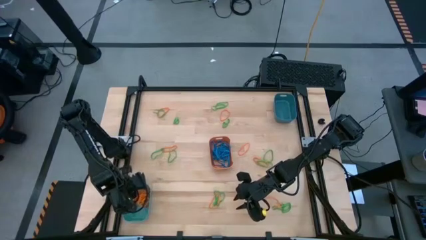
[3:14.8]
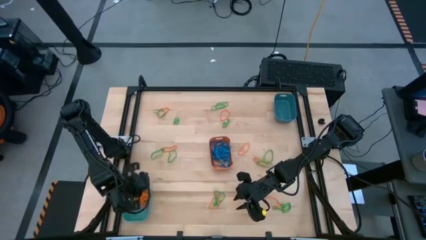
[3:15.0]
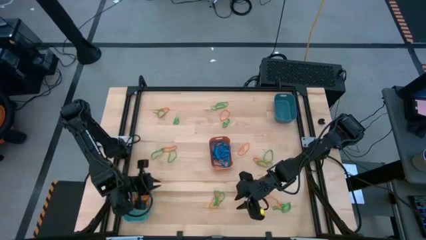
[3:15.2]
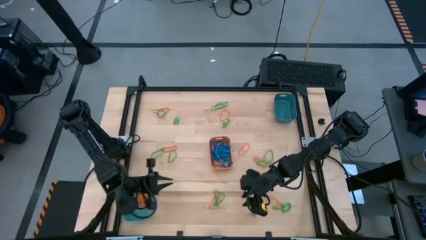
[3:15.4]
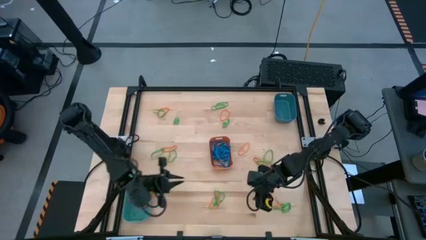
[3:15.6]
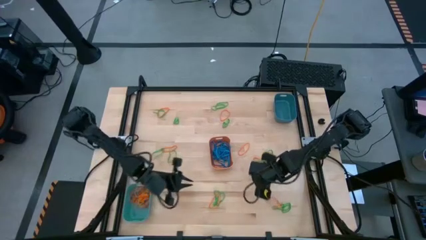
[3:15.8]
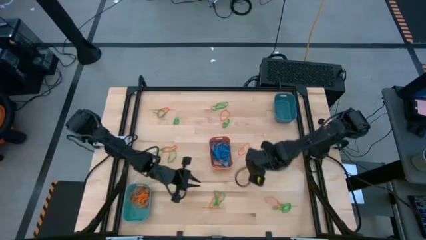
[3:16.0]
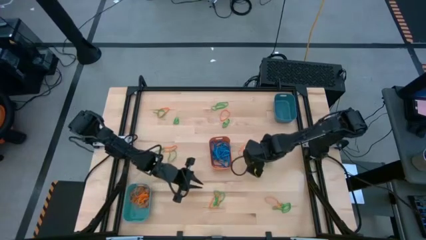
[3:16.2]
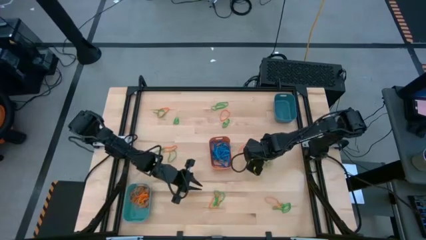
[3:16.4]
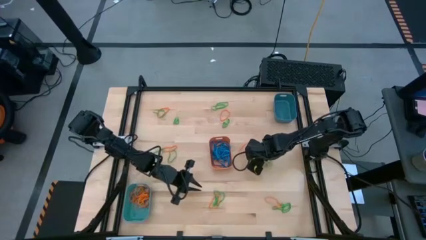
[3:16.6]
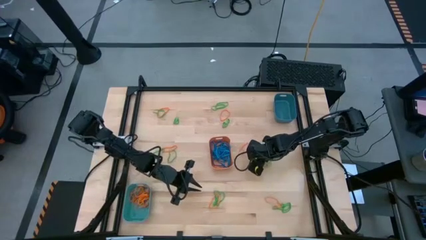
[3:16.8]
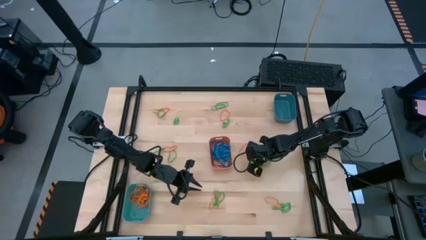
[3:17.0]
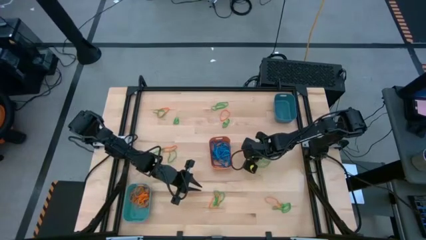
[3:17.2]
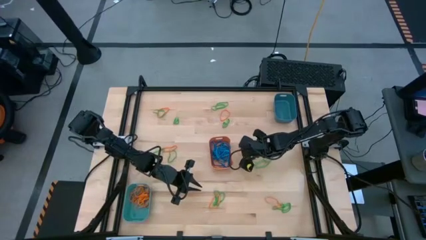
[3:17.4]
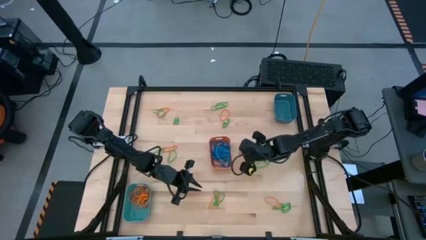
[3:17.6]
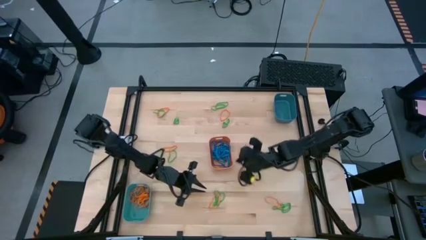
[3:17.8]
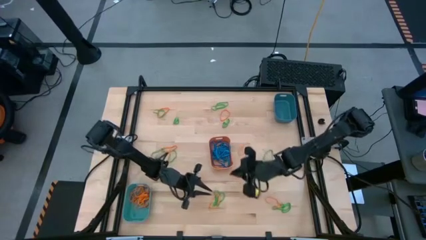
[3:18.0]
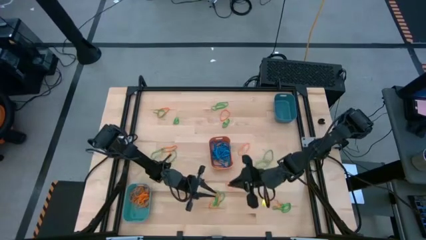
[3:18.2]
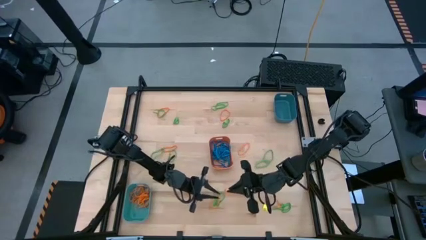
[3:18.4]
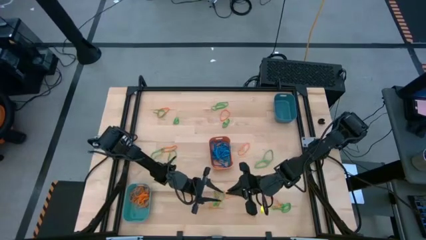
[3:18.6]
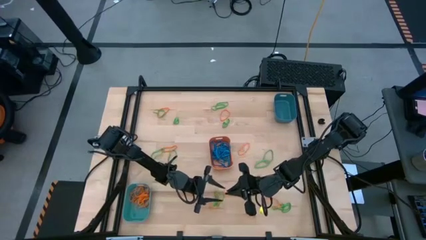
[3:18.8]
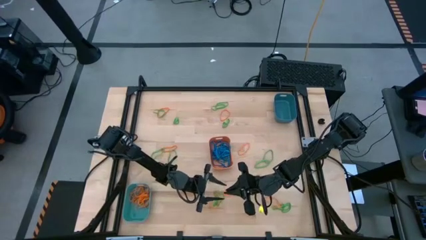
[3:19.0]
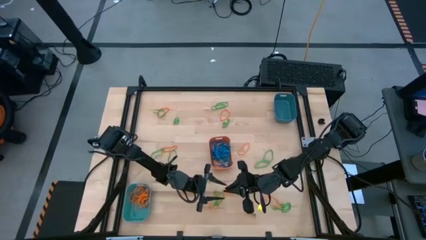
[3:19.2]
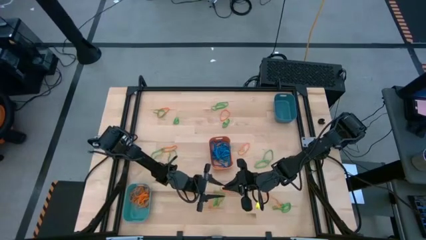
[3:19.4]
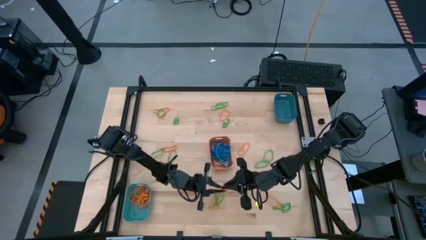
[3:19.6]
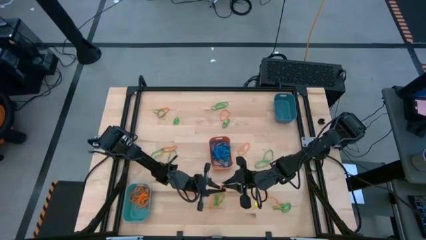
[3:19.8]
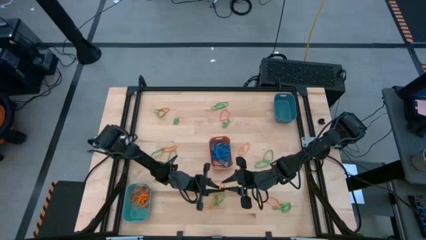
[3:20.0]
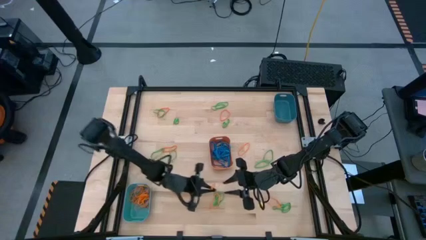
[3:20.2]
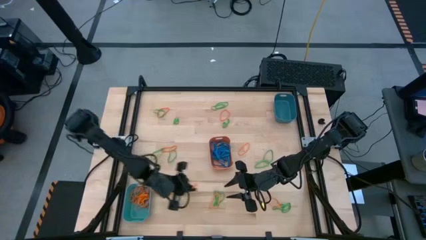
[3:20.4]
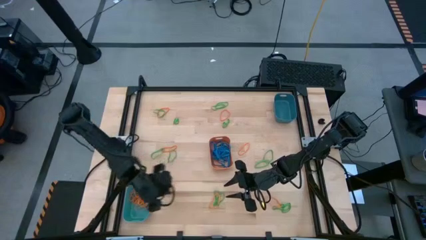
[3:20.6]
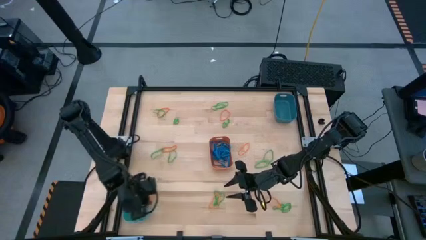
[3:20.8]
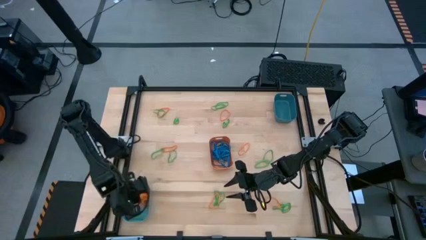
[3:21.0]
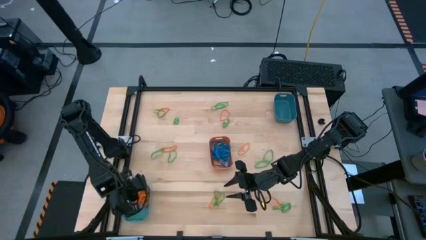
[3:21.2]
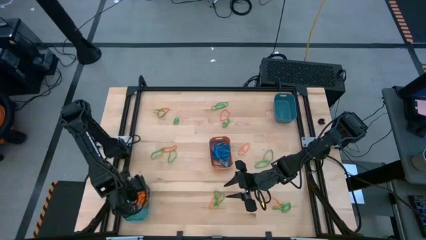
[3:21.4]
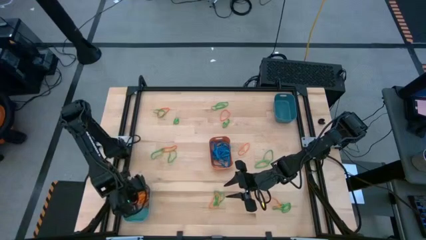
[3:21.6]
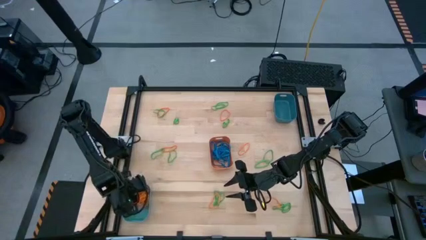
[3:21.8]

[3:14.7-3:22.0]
Task: Sort rubber bands into baskets
Put the orange rubber band into the green bin

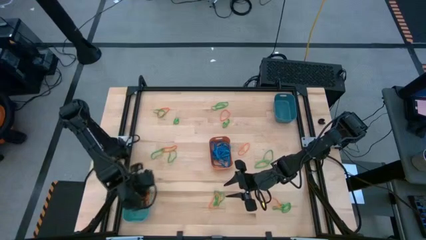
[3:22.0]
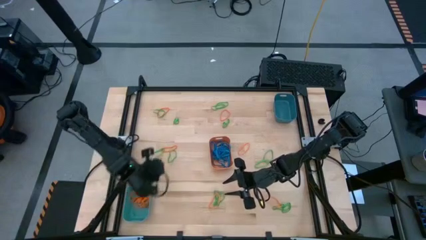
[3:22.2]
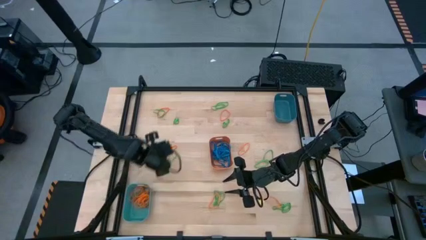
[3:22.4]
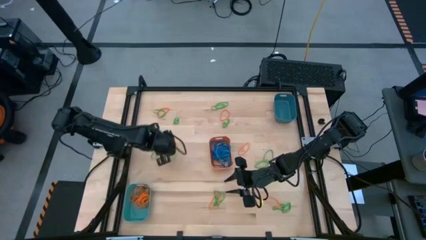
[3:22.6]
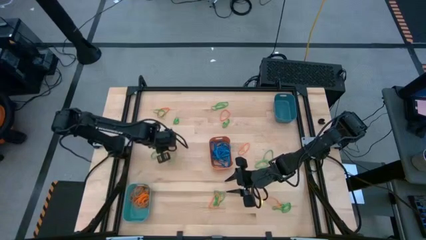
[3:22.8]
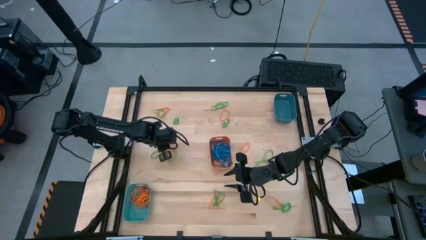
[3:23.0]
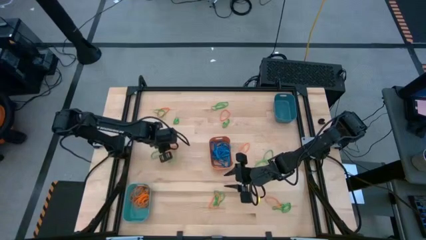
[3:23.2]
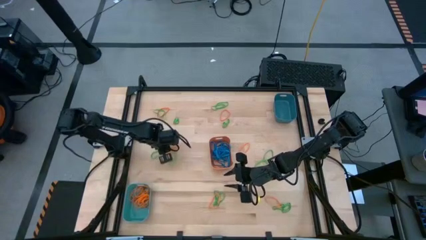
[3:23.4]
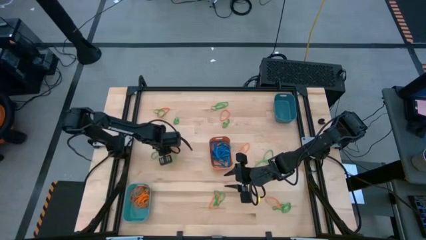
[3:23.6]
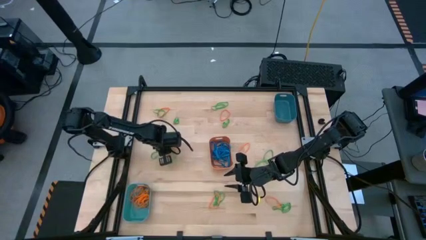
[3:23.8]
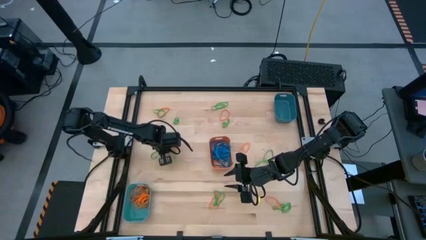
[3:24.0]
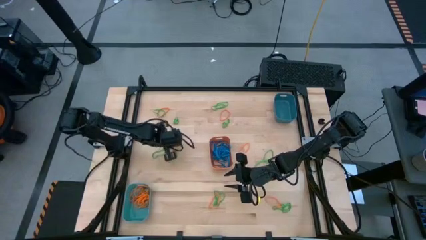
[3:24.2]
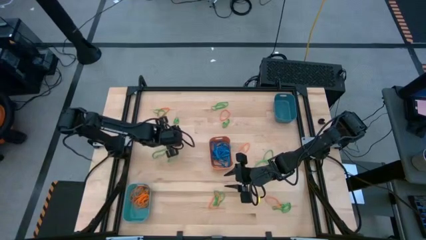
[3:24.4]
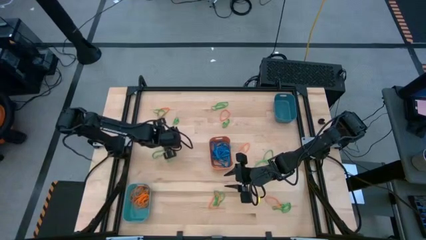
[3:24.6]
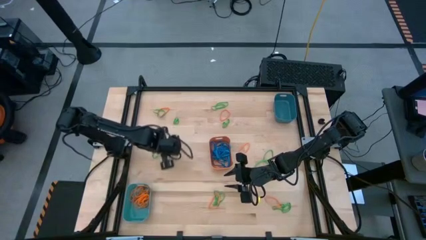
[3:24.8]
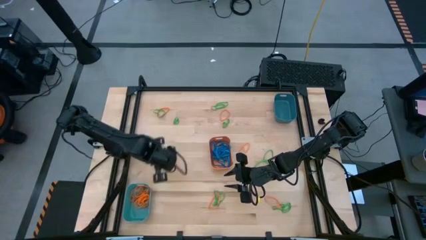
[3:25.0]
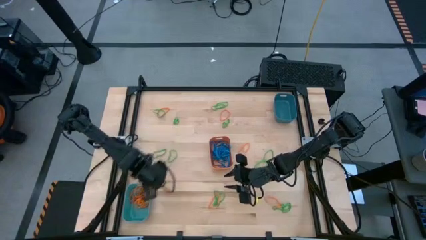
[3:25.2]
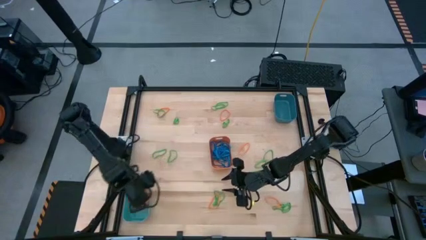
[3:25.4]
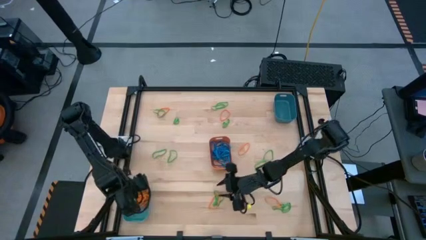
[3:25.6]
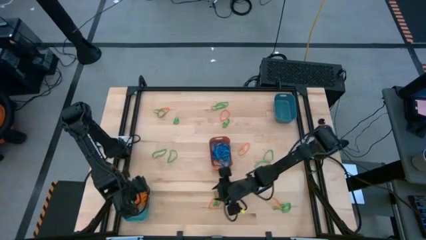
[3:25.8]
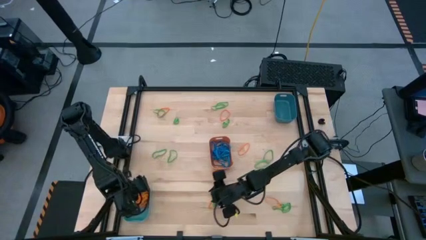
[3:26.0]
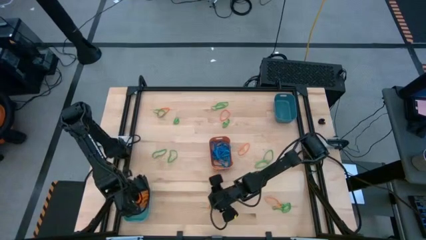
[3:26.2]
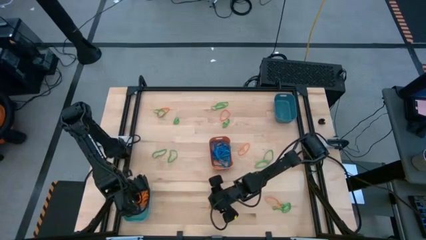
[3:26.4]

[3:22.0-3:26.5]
Put the orange rubber band into the green bin

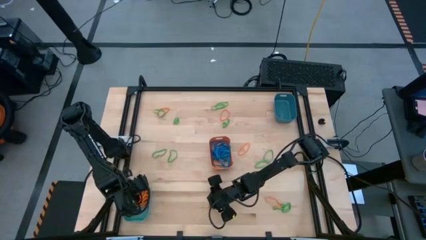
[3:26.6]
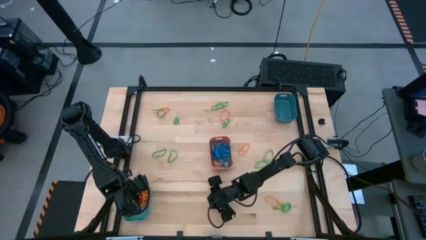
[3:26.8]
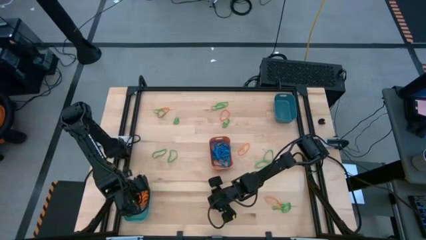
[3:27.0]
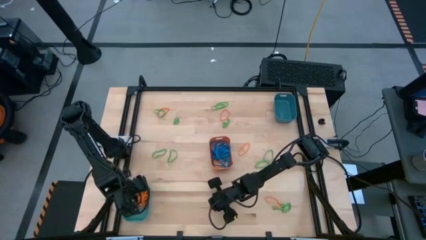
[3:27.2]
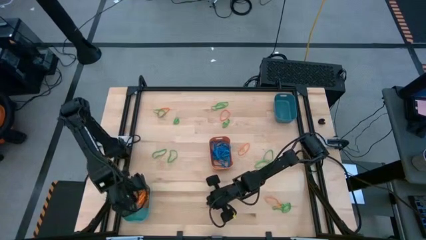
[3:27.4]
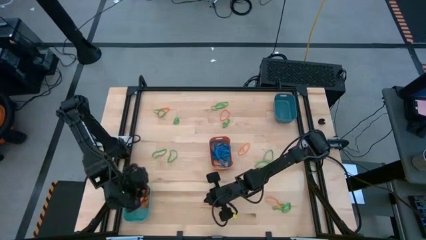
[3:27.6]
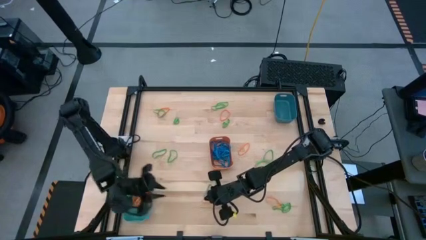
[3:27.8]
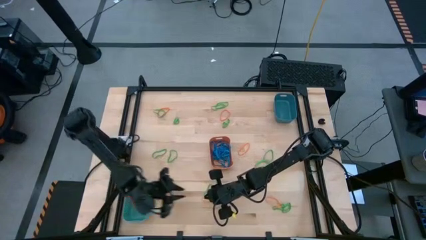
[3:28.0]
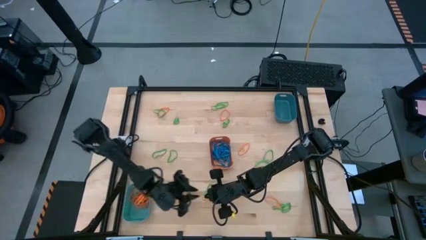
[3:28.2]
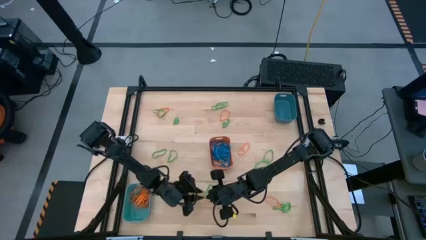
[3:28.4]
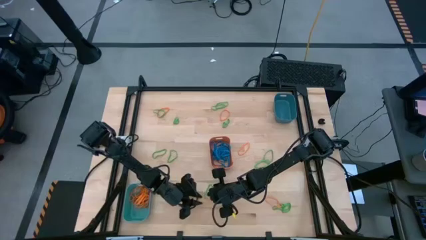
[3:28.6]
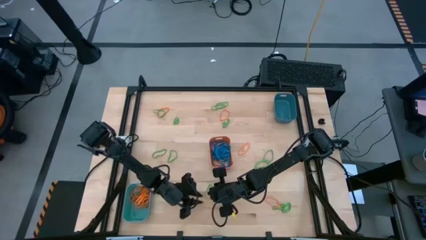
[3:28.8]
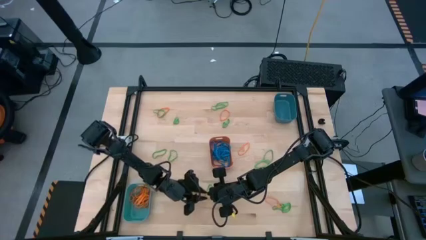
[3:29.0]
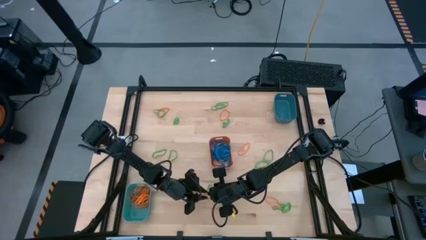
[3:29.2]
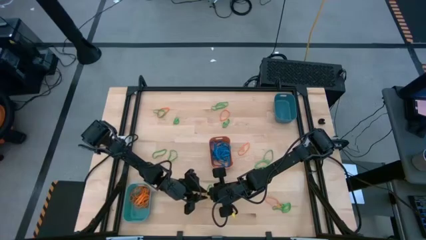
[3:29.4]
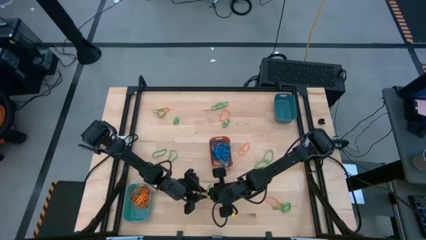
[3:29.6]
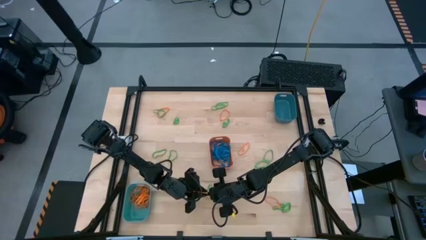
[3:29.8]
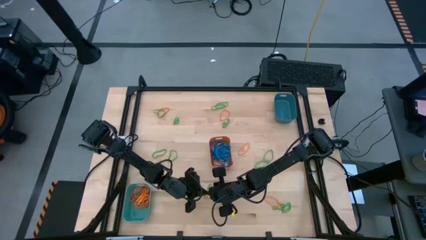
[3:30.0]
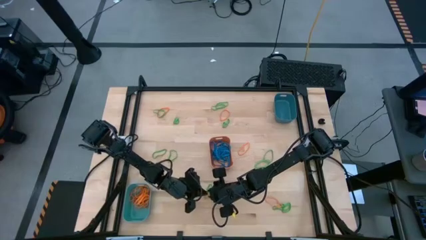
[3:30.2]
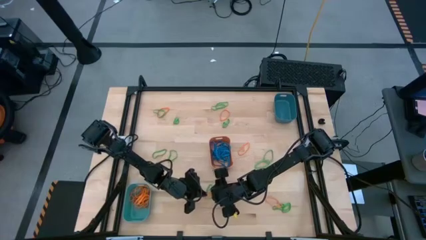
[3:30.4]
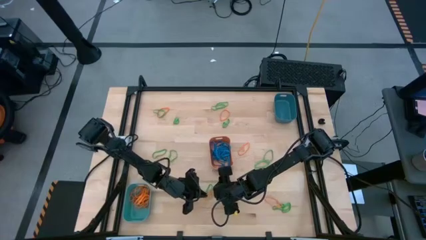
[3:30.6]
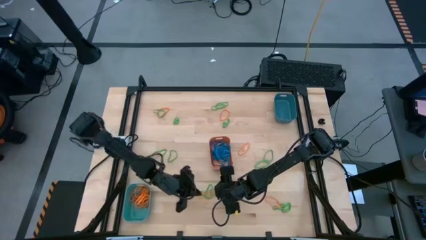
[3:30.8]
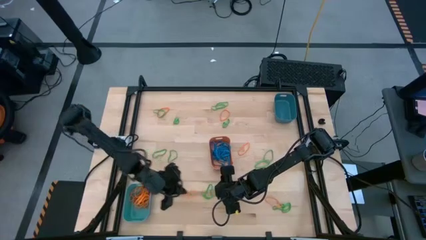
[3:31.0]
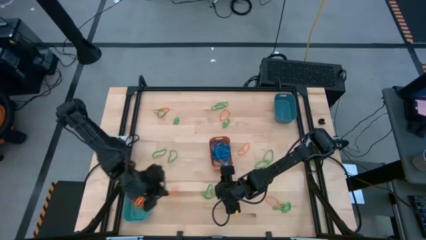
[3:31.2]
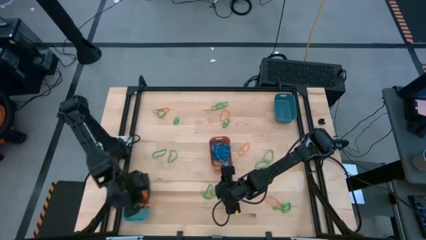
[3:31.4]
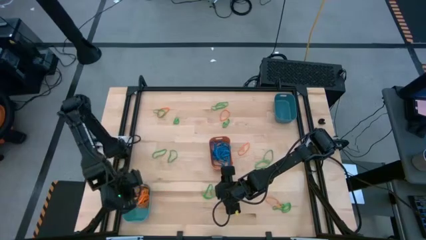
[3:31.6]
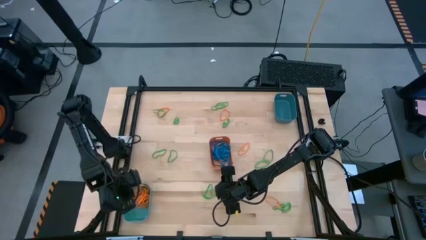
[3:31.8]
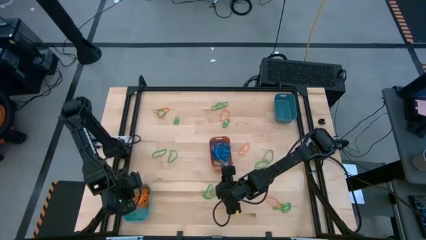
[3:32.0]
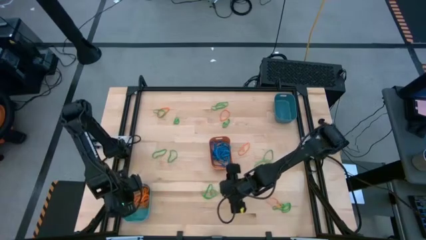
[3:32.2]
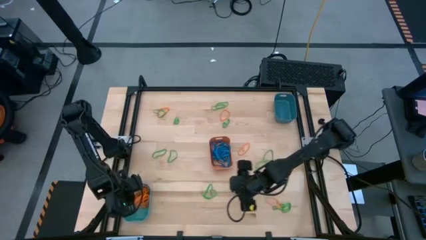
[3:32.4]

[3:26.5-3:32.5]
Put the orange rubber band into the green bin
